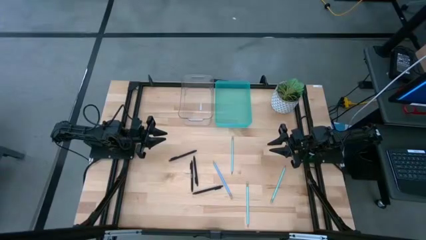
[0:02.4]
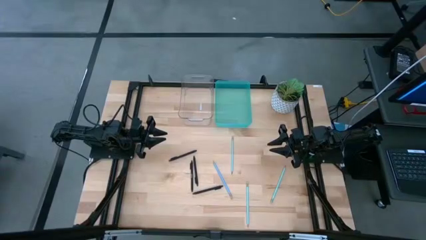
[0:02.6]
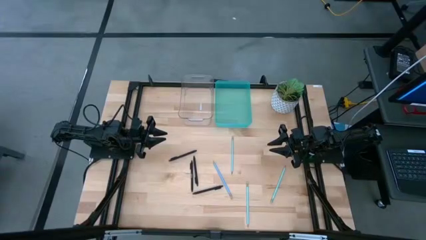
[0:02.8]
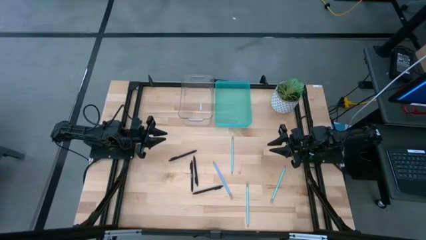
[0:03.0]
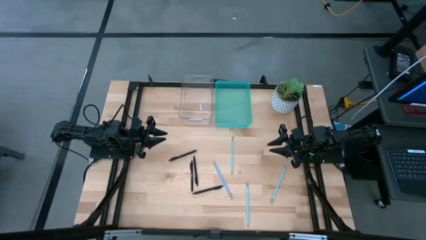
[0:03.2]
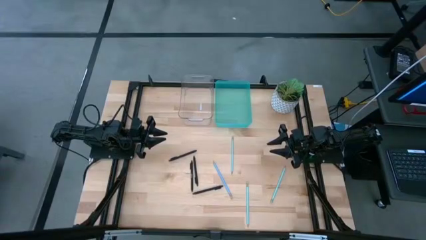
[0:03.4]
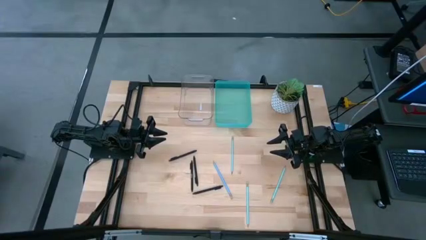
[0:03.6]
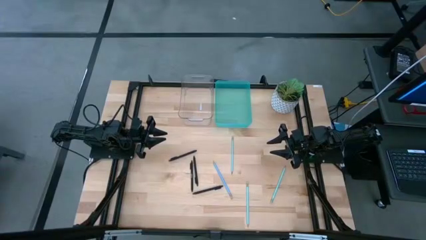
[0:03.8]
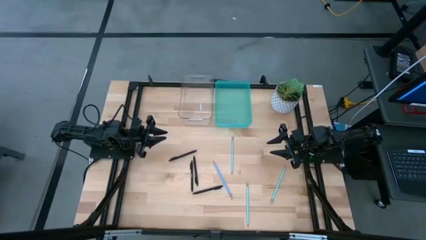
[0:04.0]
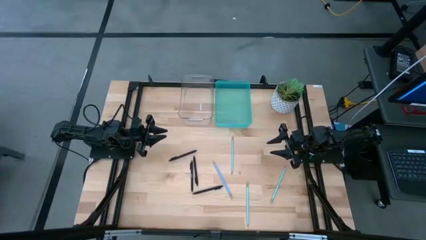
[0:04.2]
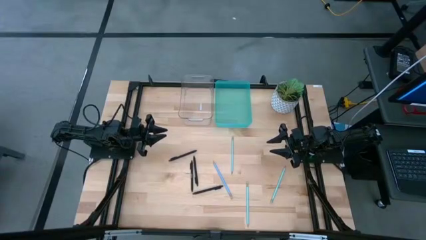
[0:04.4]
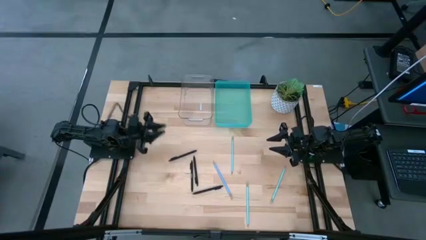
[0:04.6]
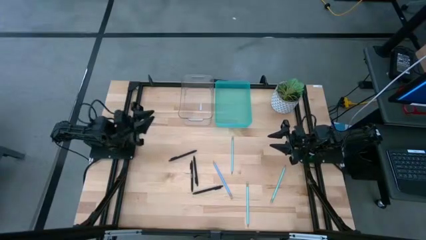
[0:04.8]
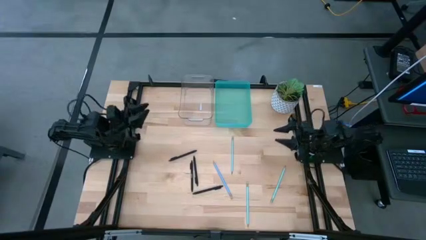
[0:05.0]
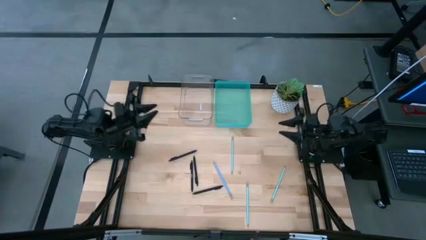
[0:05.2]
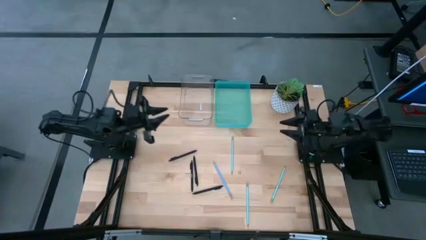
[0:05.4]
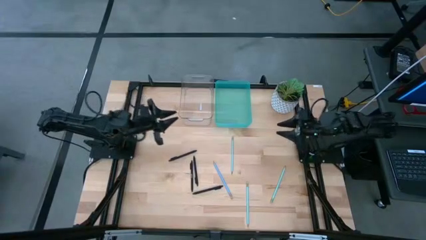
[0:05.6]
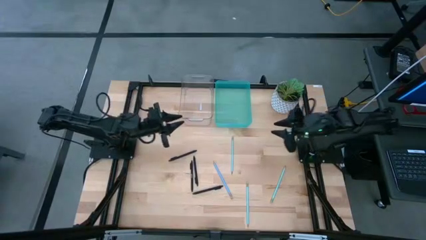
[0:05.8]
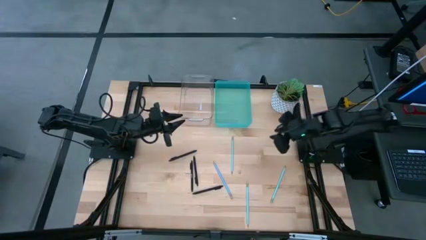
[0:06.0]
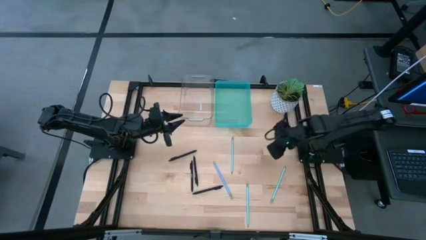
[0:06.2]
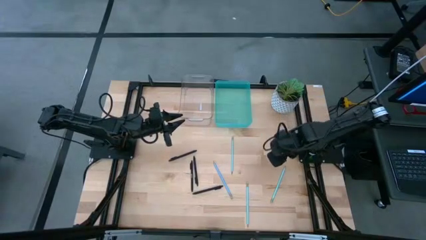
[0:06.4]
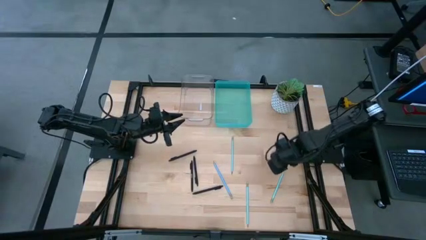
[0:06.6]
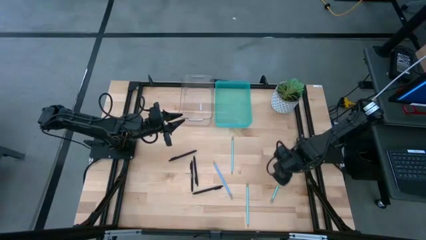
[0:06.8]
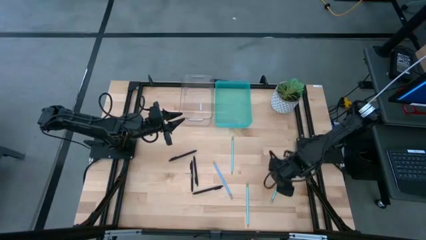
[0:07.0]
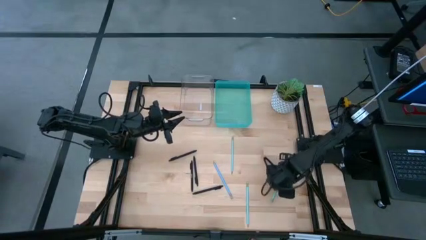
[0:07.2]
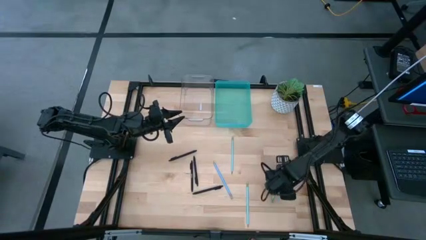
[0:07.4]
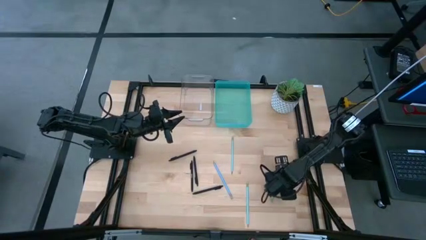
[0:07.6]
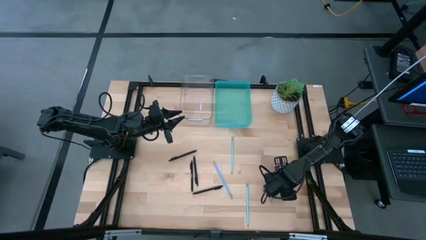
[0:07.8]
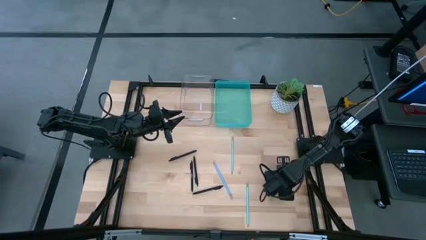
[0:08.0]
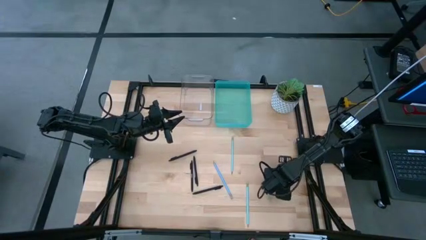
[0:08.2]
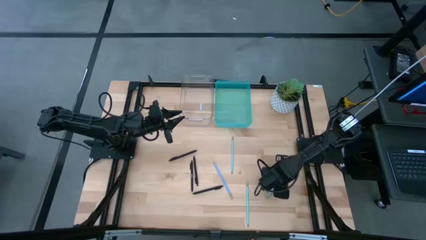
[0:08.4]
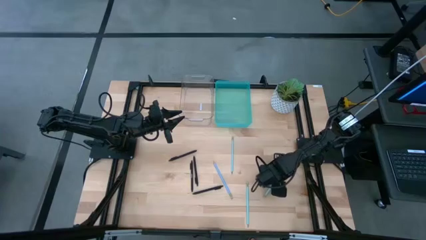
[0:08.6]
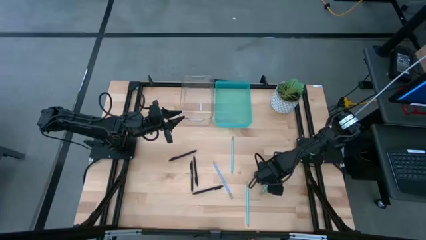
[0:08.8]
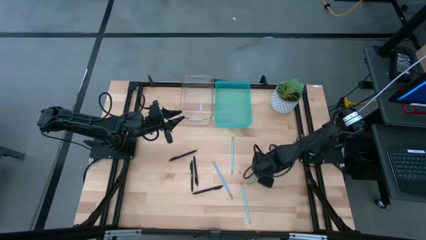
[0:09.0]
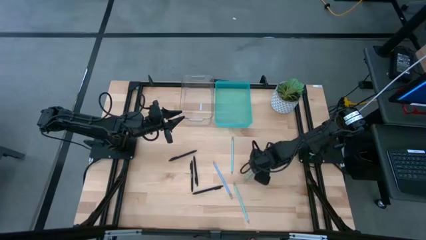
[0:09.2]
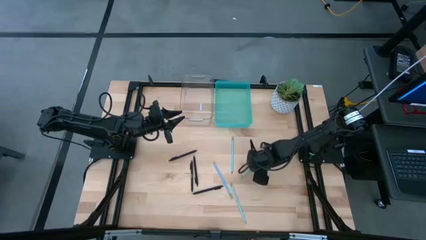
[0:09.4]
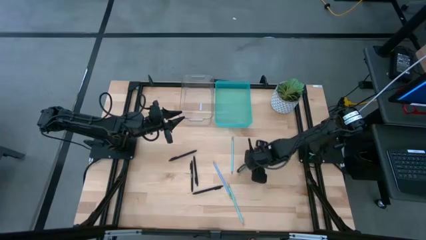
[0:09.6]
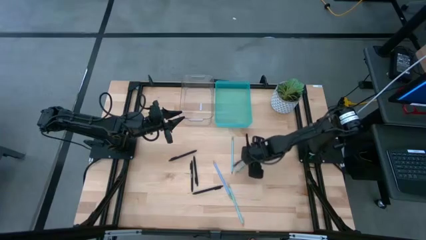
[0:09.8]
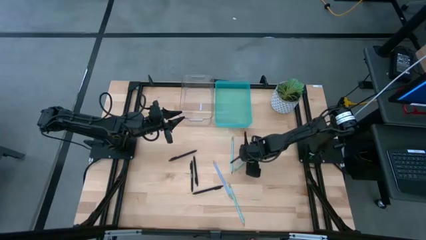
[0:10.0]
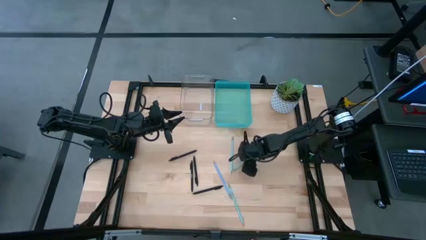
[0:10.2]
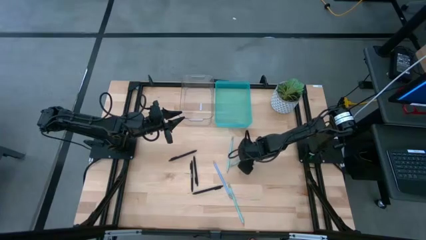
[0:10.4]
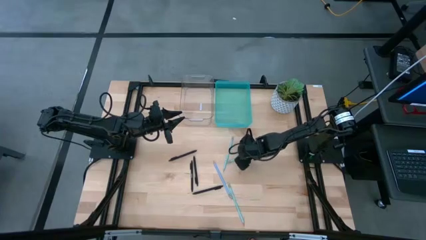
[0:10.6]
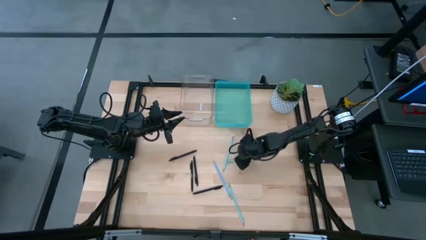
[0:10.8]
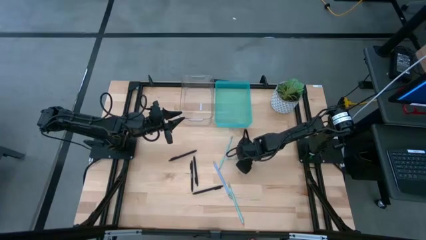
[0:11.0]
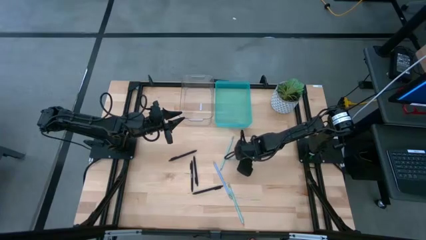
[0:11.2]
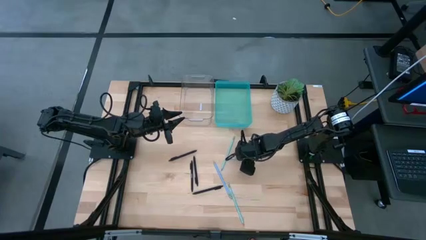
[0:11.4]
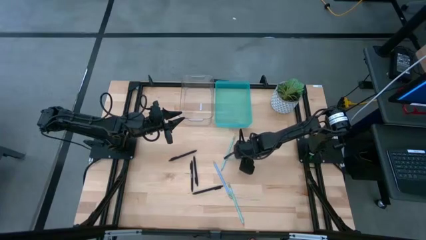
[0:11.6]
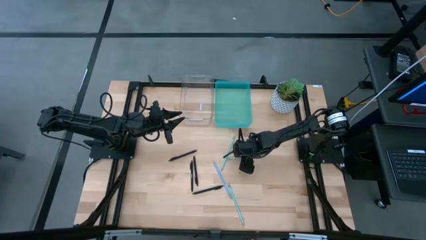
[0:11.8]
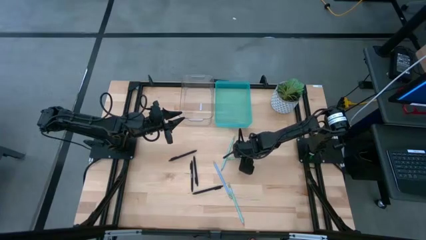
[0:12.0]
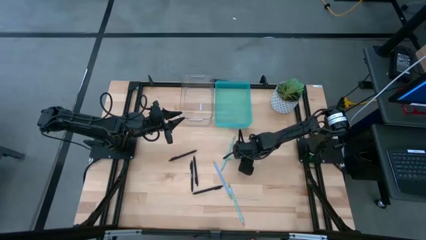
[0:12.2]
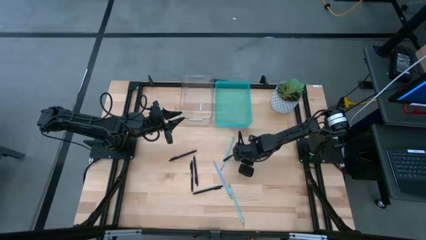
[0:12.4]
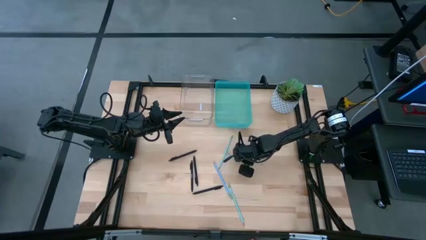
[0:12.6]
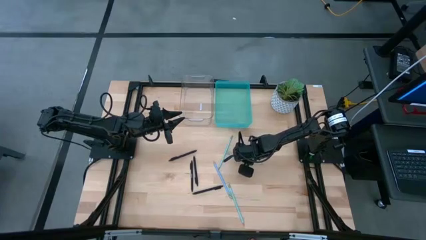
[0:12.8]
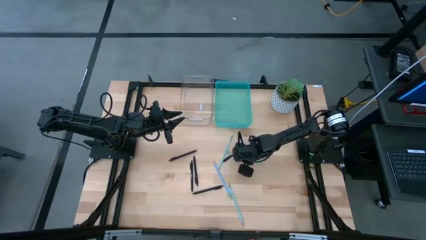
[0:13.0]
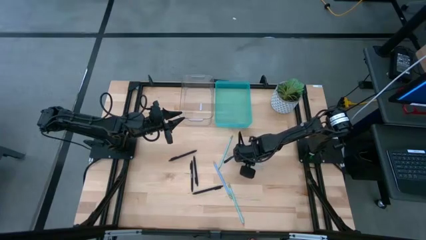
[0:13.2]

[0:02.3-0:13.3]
Task: Sort pens & pencils
Put the light blue pencil into the light blue bin
